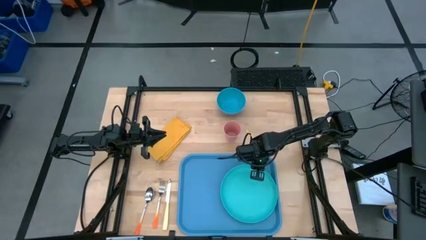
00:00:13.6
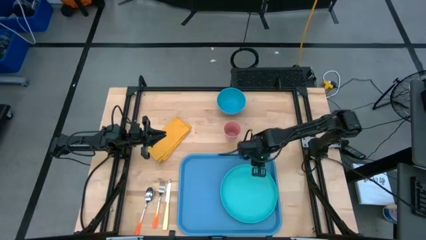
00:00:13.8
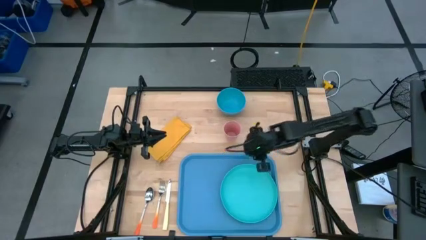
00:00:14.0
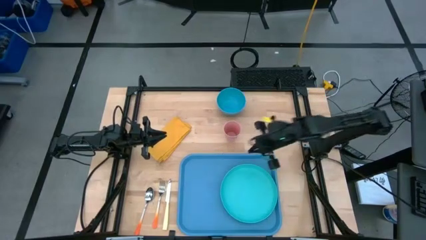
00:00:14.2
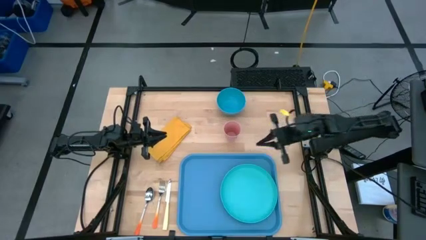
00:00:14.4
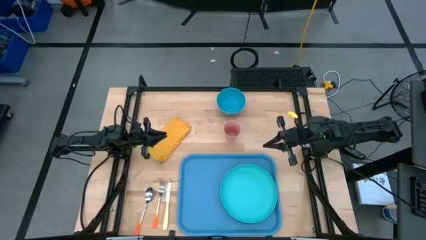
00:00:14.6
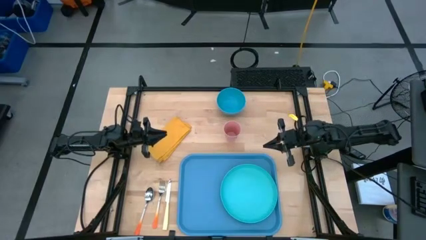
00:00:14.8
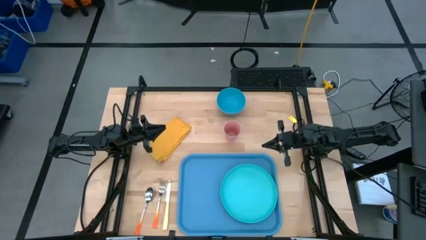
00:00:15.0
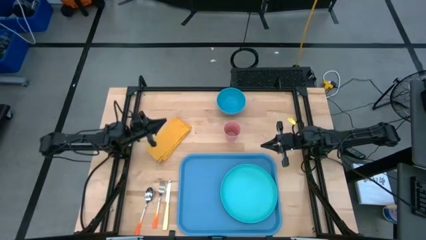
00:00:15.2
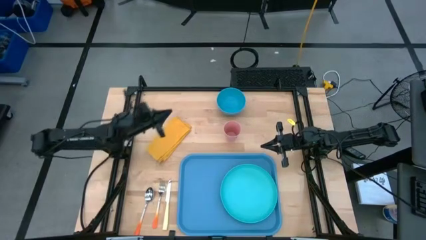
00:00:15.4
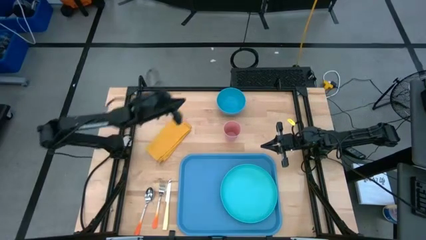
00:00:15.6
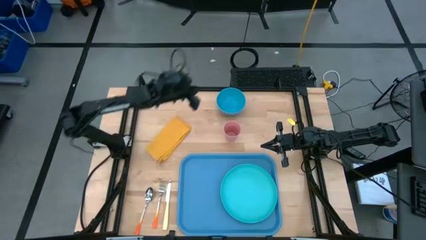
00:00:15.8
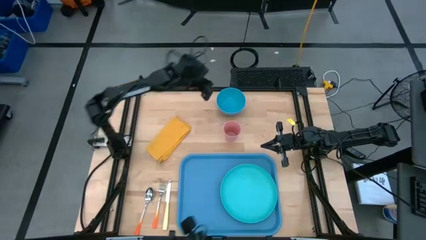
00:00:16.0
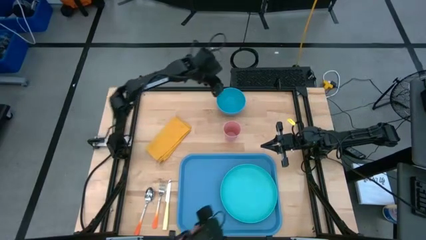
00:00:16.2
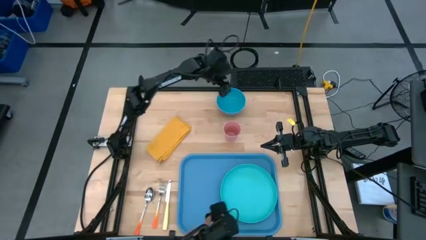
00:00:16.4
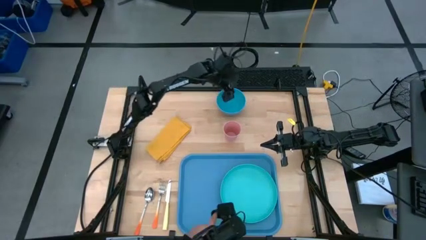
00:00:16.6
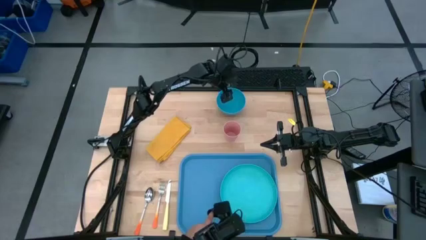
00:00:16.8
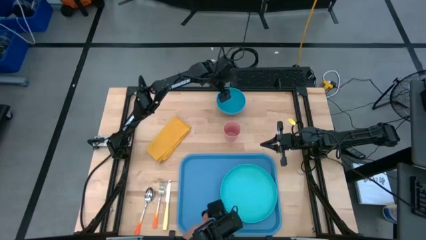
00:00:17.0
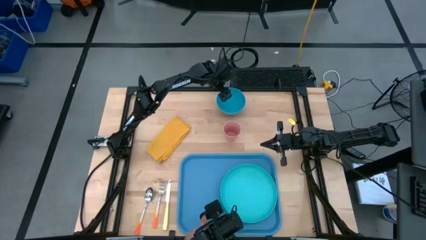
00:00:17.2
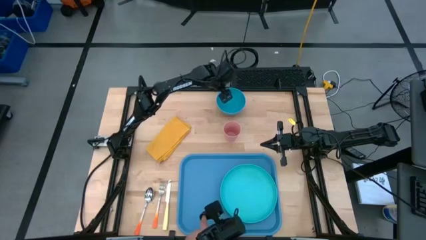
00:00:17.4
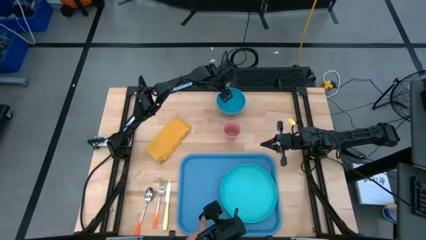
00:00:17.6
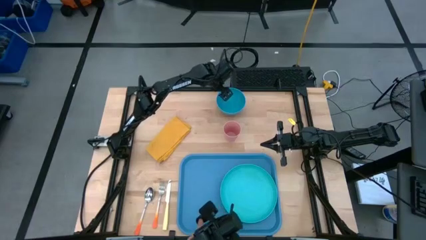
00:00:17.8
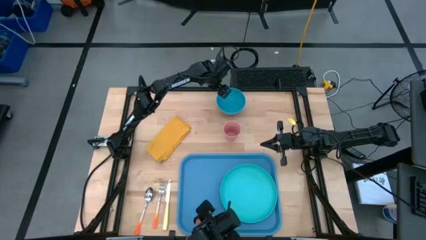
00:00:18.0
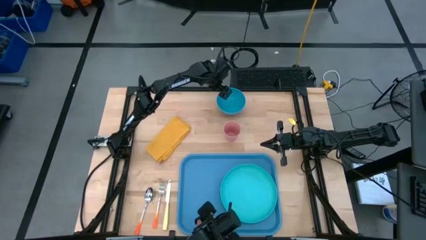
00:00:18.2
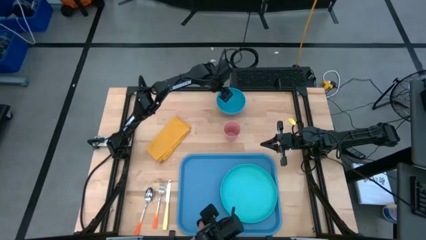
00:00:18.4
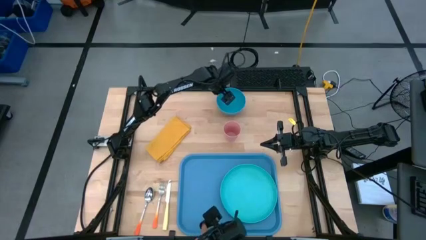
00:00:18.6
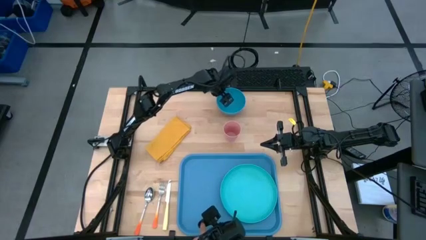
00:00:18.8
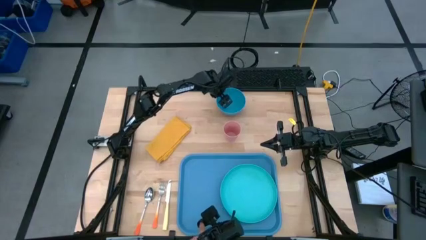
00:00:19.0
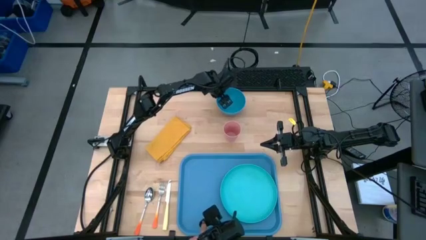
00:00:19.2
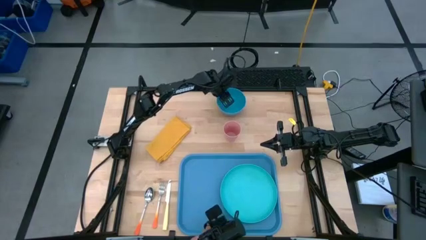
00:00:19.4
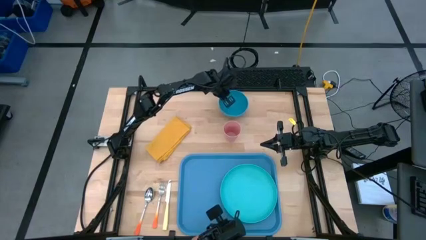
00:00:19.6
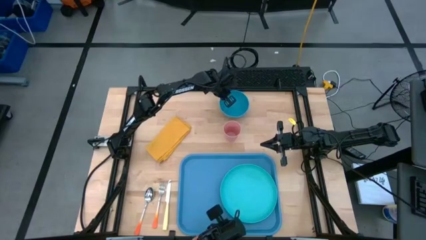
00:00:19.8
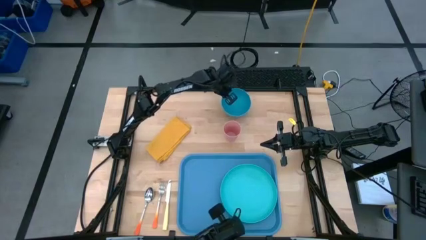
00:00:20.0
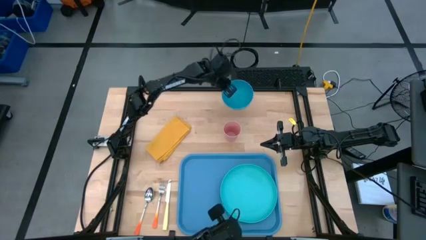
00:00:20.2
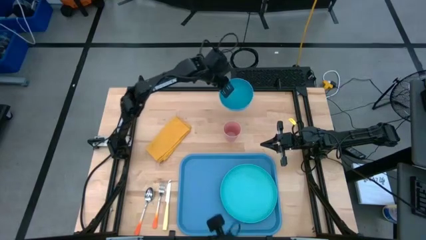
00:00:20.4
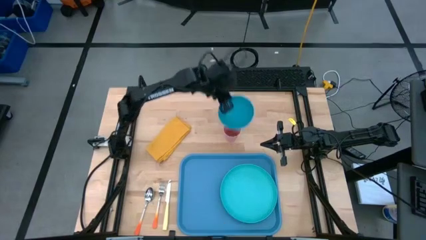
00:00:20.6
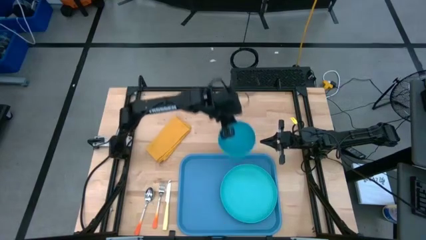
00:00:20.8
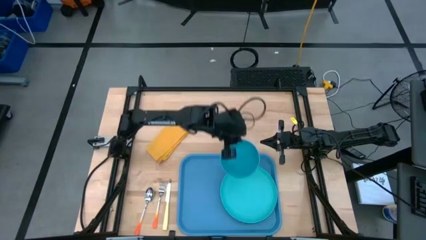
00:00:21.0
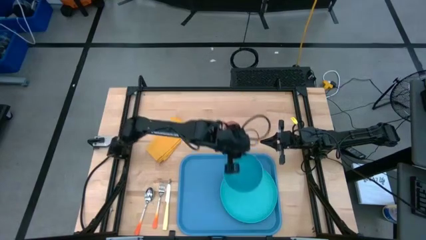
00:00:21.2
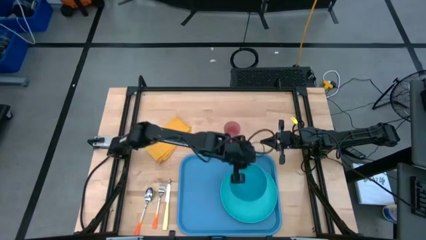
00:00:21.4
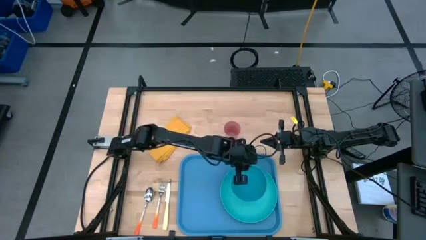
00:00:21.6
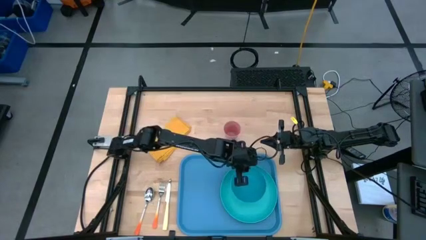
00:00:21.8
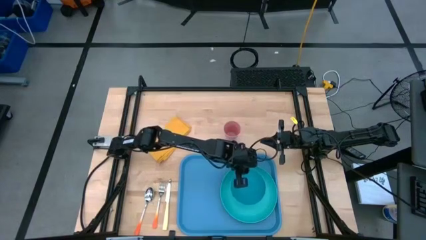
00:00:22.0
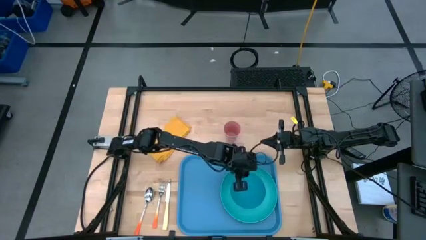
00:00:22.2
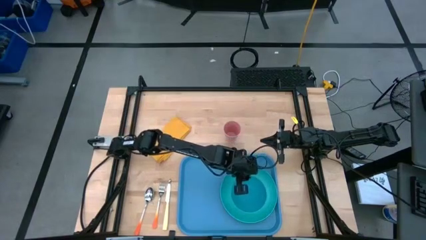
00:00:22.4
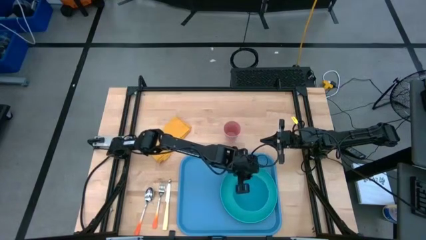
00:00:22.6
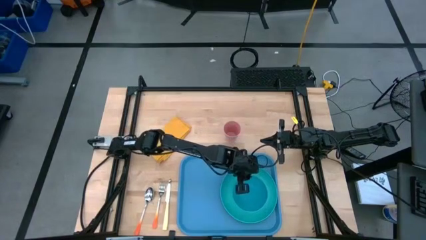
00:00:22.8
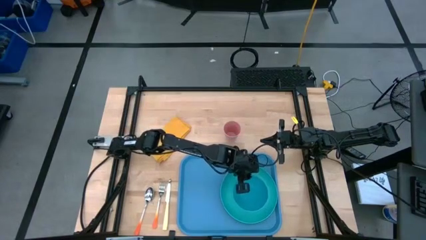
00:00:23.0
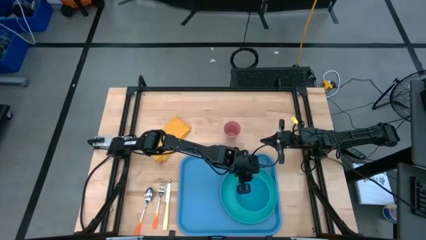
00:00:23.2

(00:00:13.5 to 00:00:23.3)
Task: Set up tray
Put the blue bowl on top of the green plate

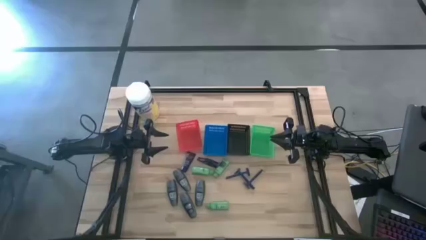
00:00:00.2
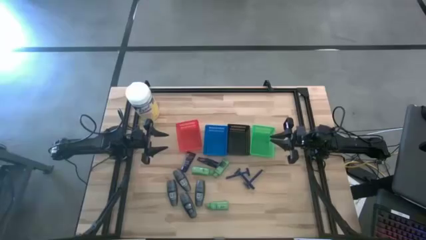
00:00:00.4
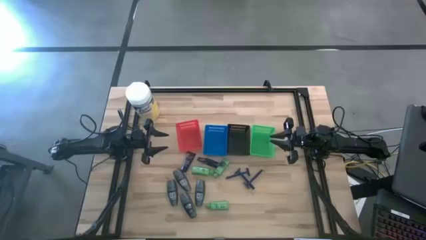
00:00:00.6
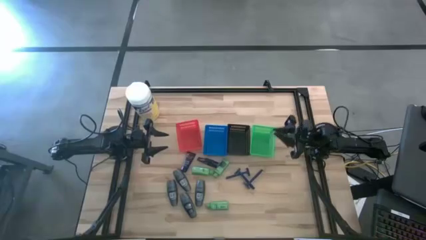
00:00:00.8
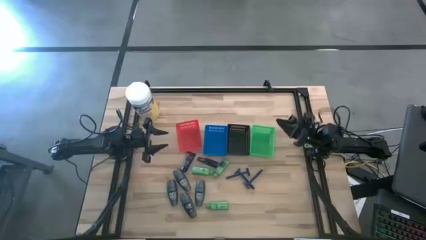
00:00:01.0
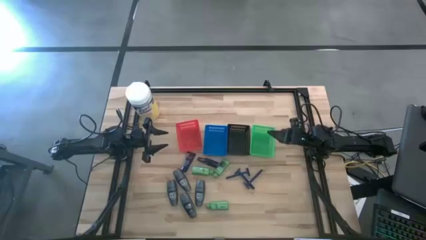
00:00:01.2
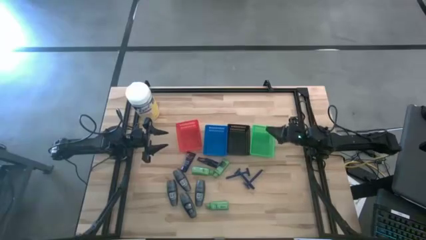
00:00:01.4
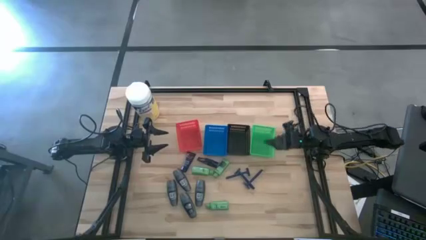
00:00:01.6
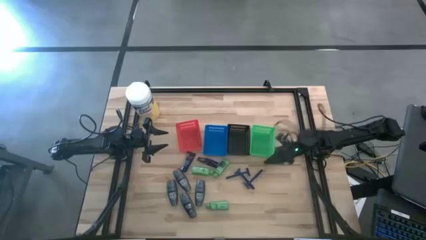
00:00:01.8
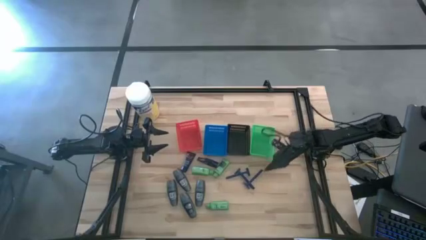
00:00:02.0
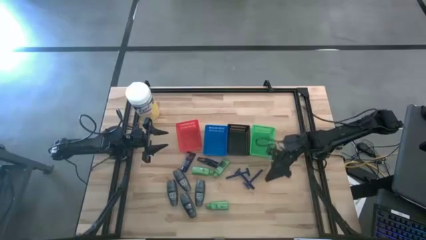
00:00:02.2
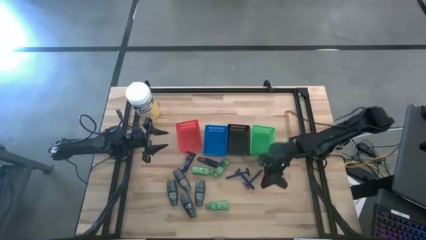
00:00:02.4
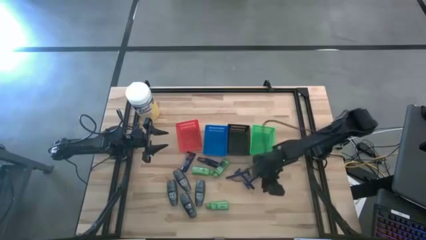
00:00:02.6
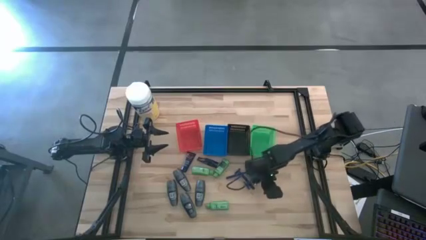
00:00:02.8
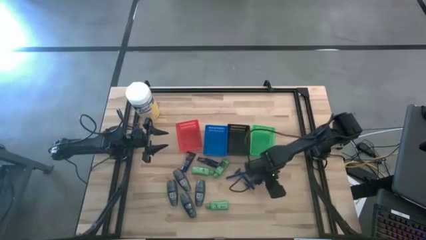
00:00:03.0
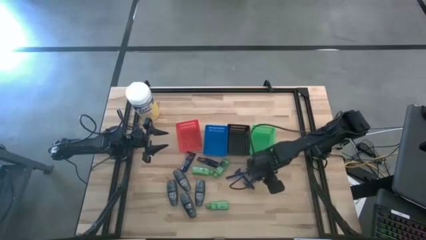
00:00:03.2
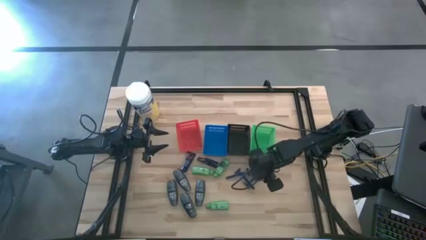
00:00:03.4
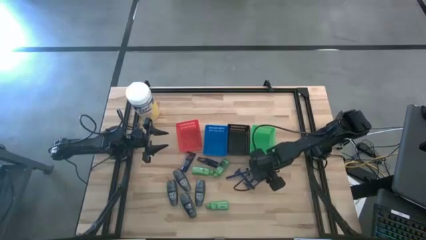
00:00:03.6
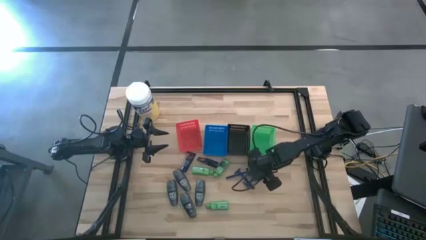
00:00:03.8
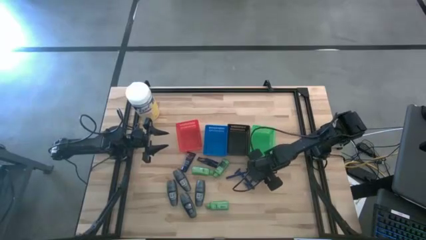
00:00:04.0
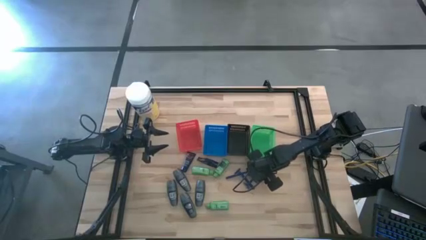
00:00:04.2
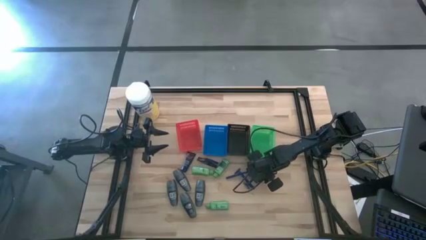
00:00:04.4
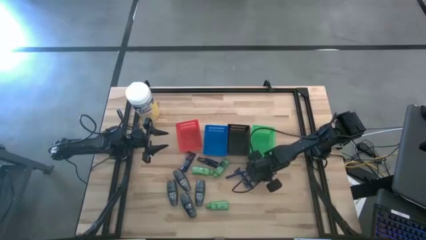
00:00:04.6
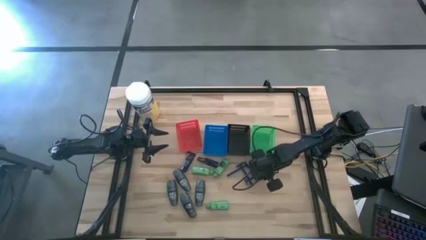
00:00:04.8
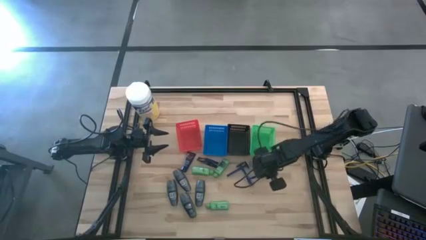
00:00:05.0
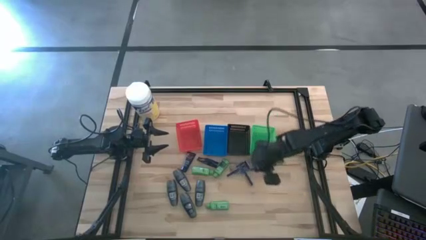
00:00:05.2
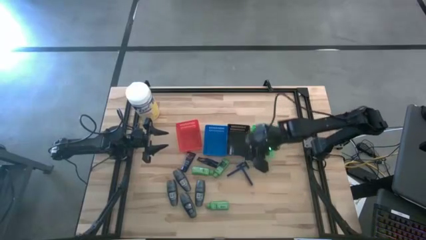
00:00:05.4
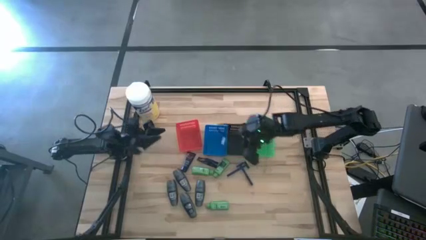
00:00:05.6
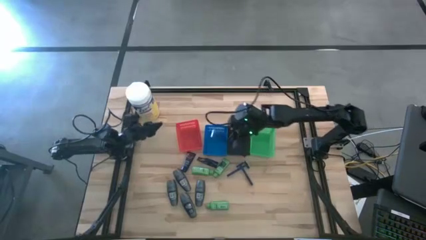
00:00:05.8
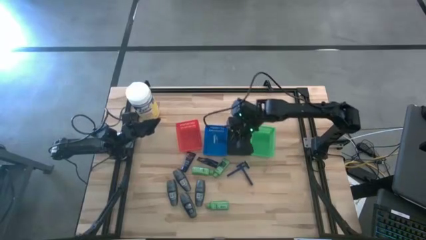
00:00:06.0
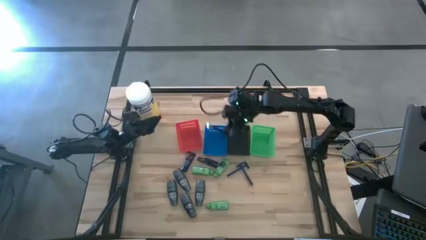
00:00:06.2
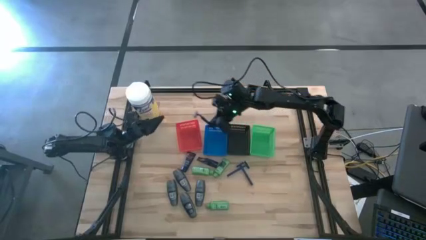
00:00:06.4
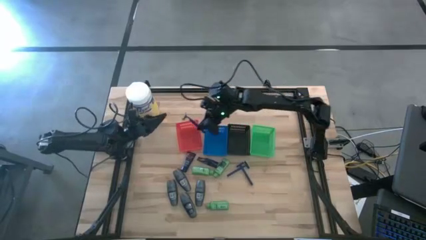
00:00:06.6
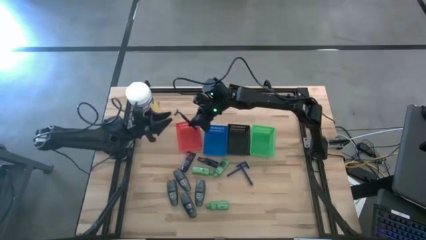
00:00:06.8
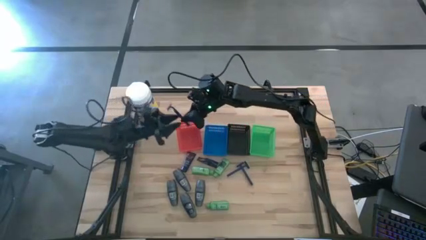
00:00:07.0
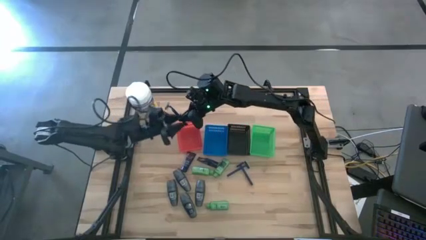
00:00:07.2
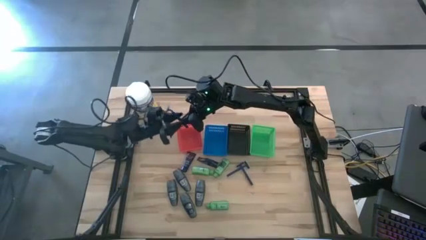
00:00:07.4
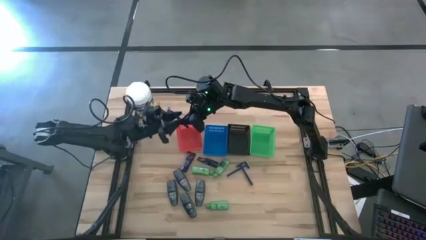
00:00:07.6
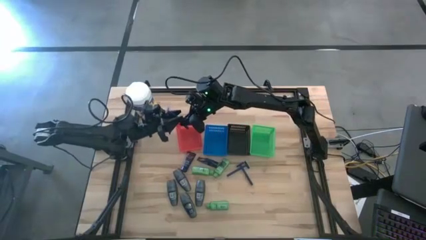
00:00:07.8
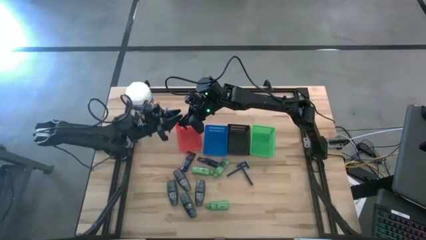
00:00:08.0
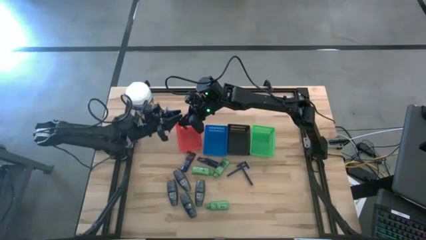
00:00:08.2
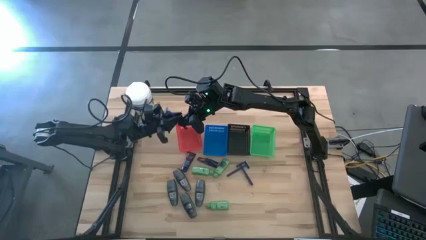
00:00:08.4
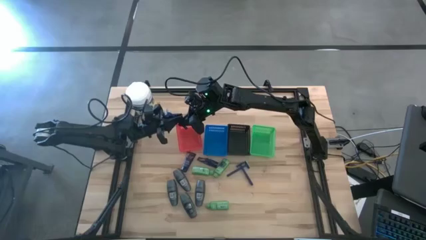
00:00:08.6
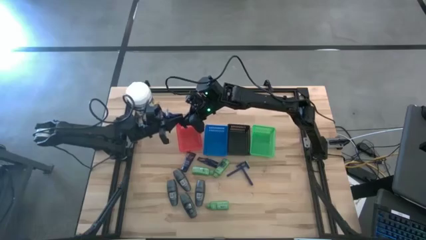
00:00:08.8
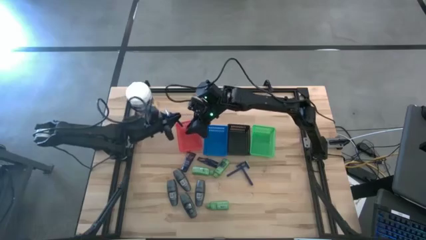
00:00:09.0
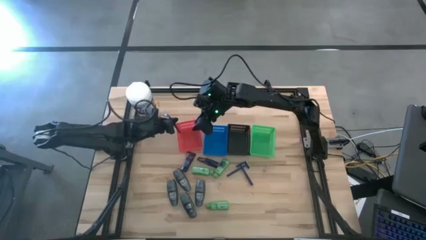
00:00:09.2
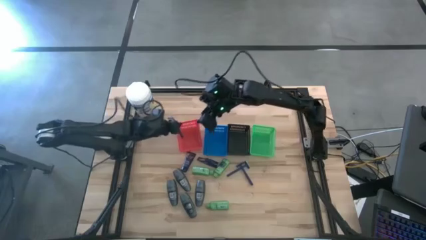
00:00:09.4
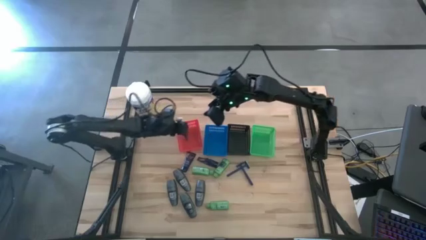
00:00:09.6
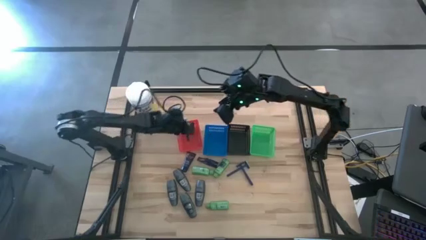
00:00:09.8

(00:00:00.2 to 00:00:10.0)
Task: Pick & Place Travel size toiletries
Put the razor into the red basket
